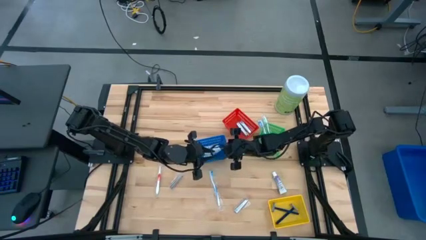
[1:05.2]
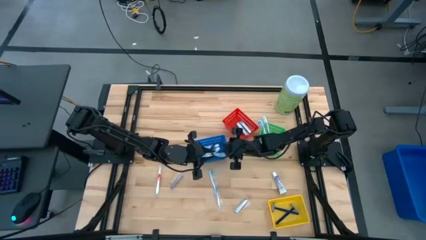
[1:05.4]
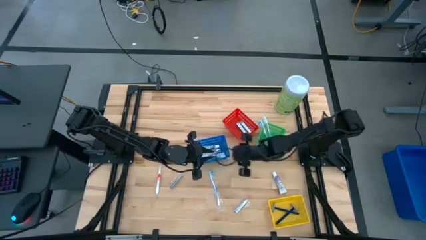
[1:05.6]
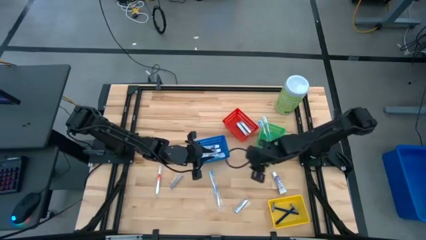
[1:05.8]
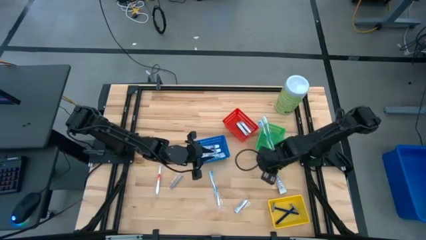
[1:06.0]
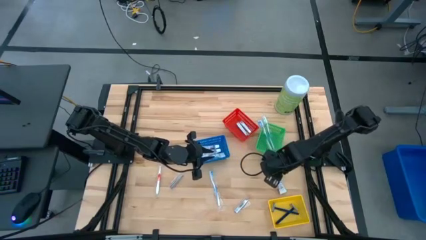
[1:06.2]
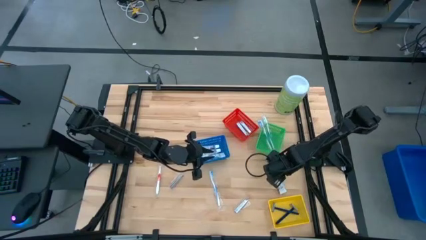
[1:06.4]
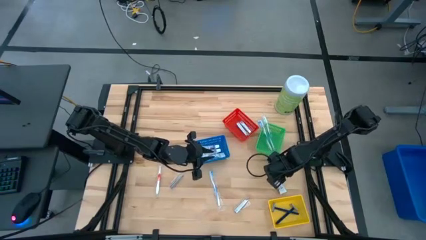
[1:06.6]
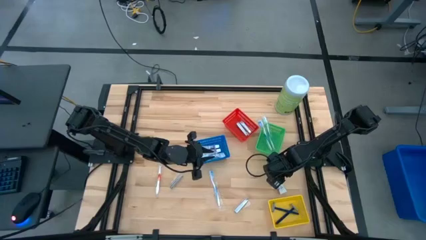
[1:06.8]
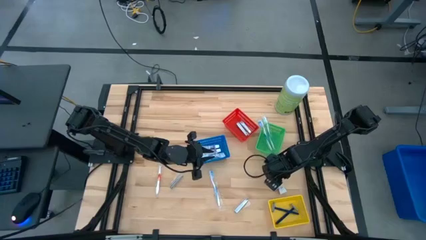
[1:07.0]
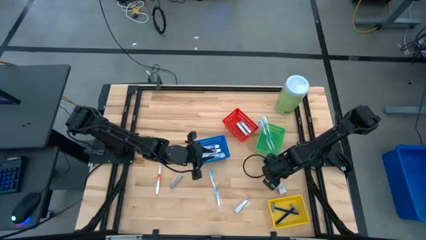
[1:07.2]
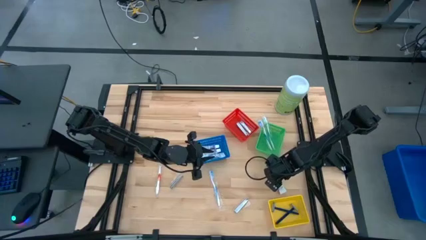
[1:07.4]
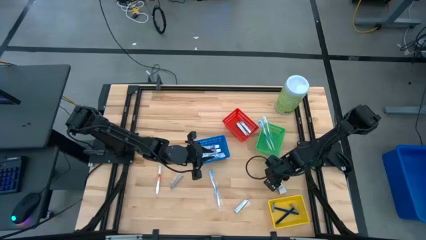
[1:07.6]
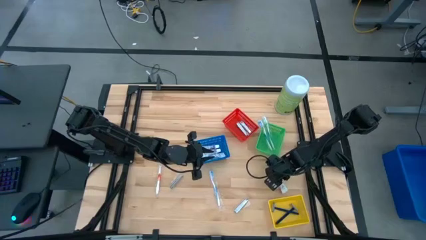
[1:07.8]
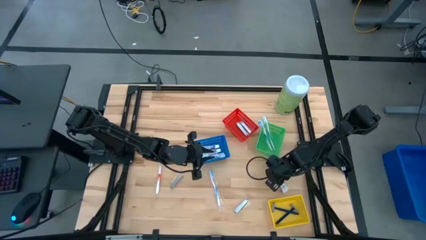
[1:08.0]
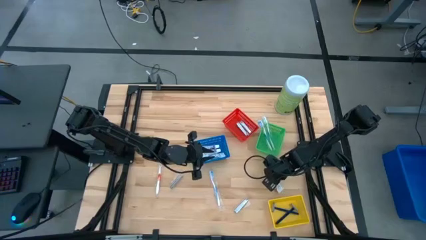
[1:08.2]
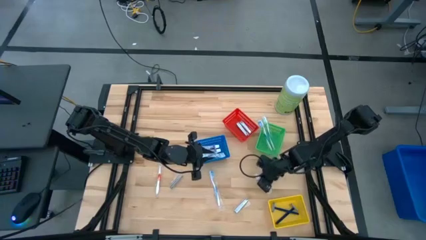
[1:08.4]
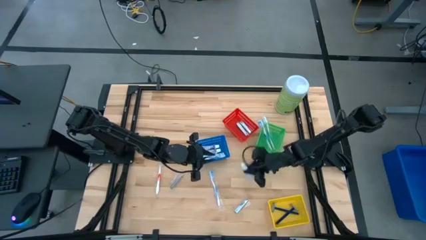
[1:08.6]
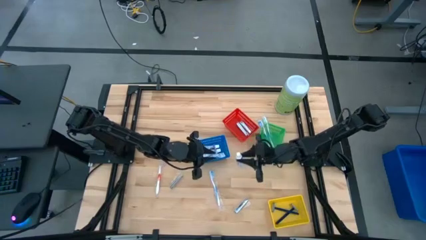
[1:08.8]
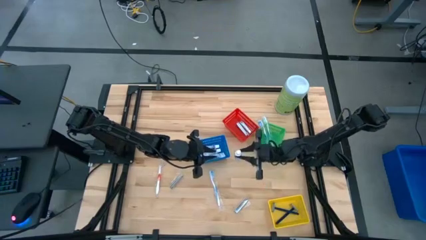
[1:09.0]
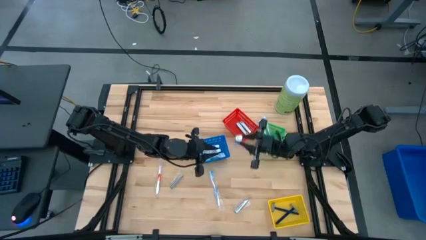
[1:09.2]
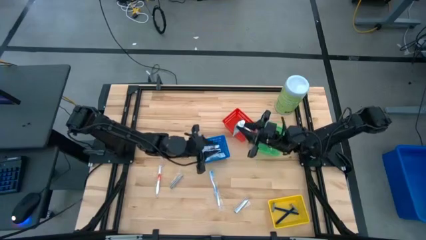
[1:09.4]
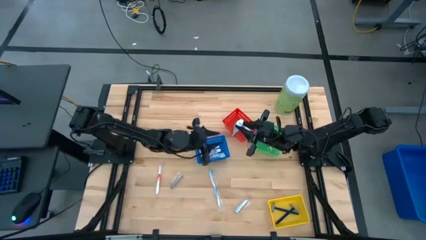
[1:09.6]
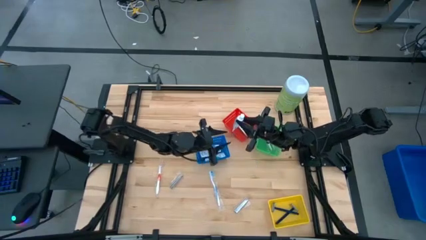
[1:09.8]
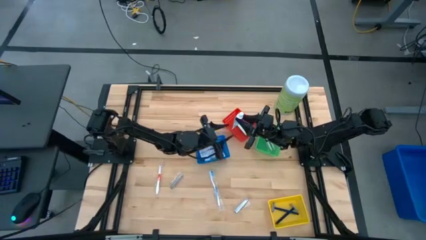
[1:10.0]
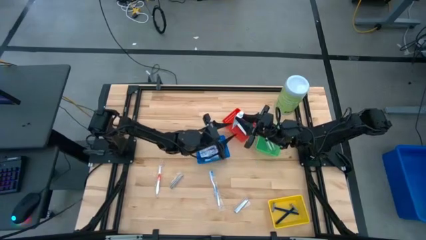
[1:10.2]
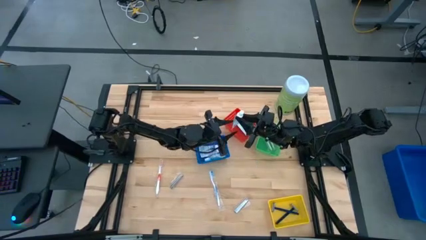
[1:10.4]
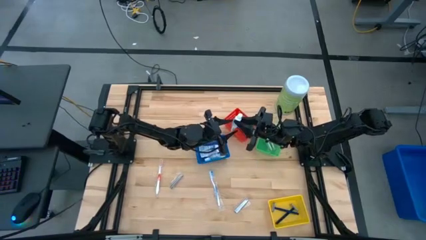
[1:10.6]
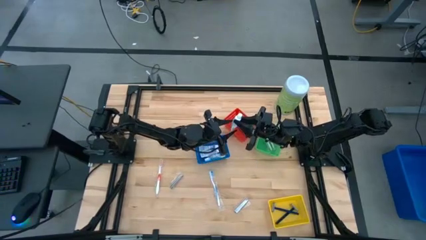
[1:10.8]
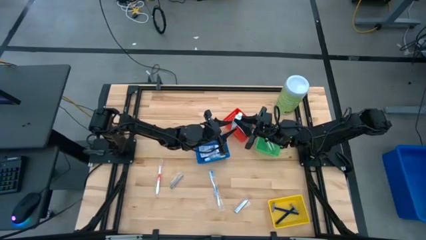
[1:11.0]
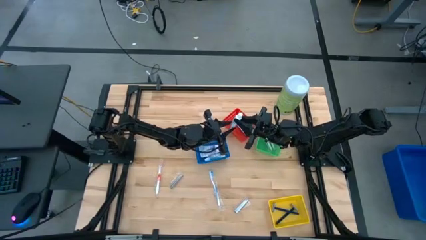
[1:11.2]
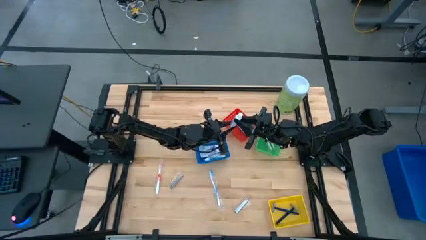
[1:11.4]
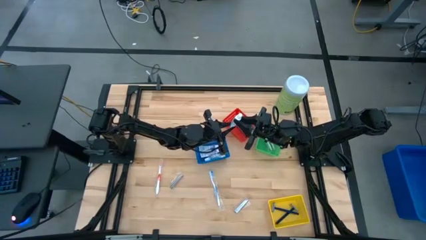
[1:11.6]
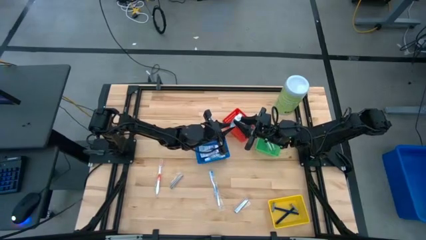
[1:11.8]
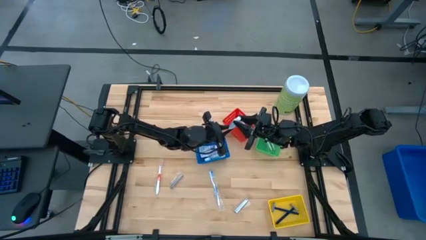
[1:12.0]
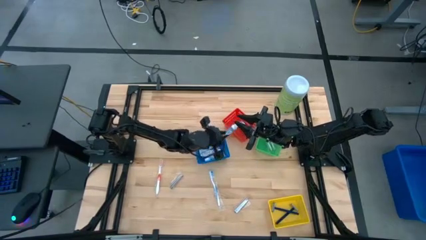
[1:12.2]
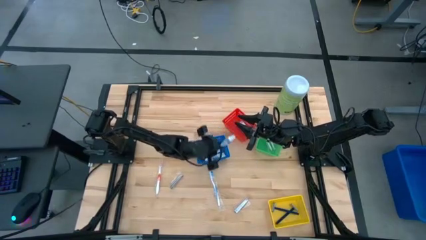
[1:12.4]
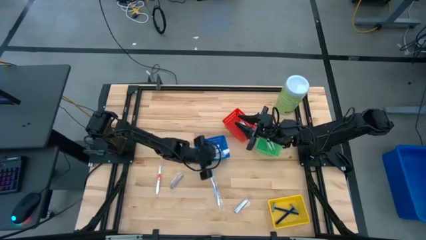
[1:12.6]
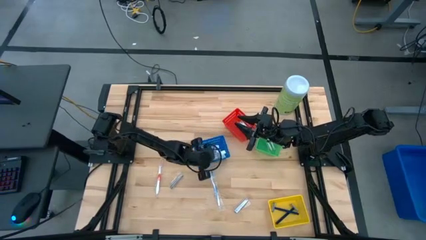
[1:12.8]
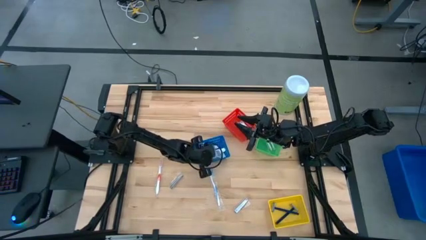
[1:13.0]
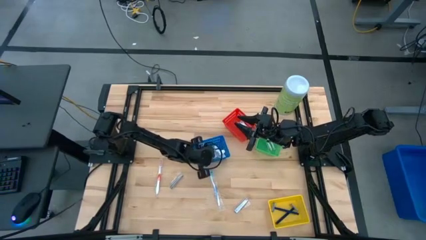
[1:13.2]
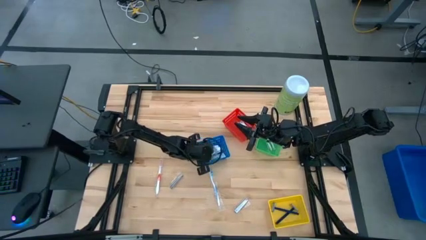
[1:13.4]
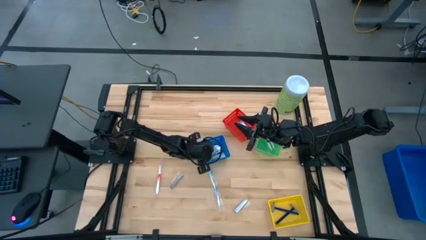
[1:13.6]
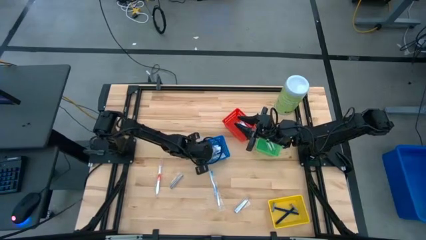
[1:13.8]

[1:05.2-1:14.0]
Task: Pick & Place Travel size toiletries
Put the white toothpaste into the blue bin

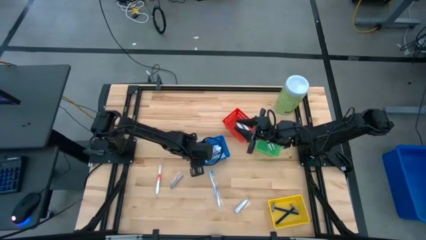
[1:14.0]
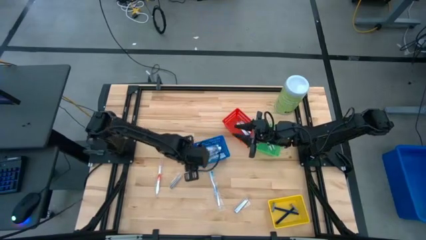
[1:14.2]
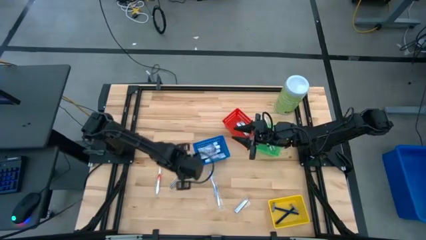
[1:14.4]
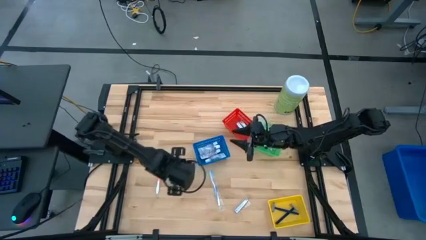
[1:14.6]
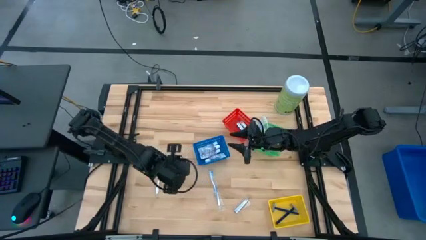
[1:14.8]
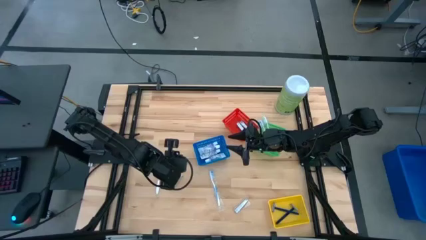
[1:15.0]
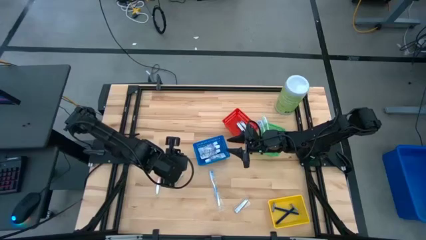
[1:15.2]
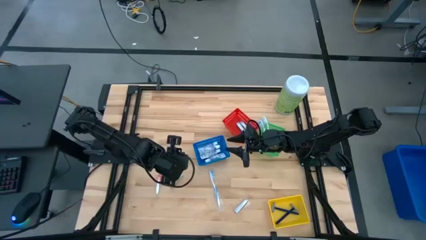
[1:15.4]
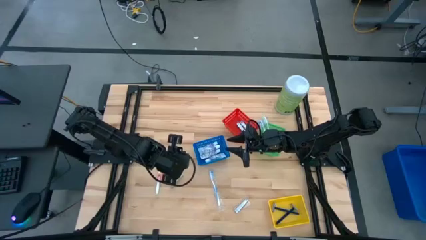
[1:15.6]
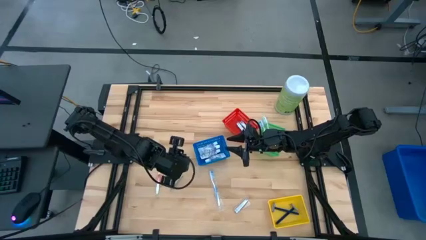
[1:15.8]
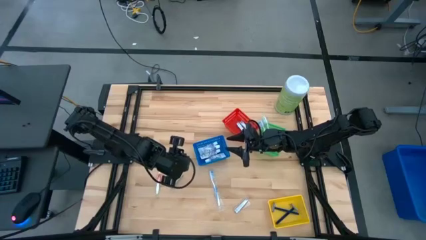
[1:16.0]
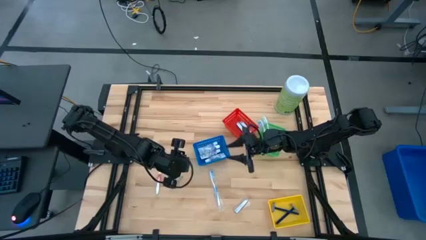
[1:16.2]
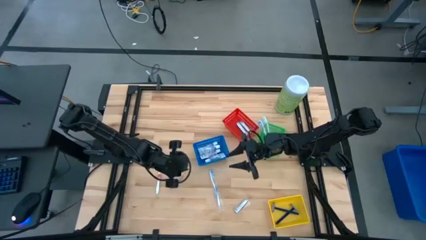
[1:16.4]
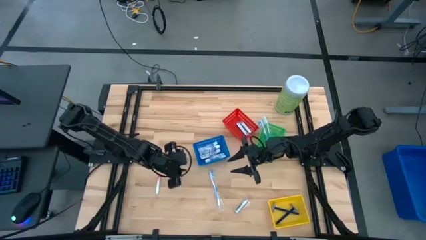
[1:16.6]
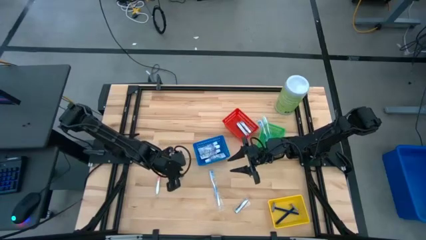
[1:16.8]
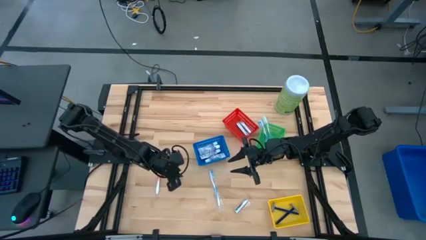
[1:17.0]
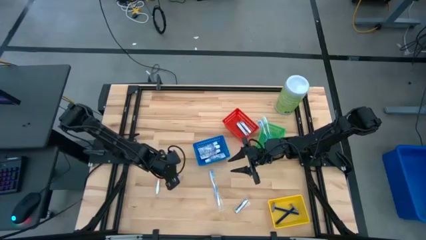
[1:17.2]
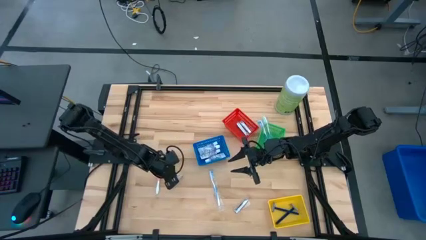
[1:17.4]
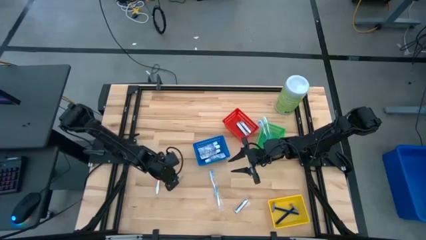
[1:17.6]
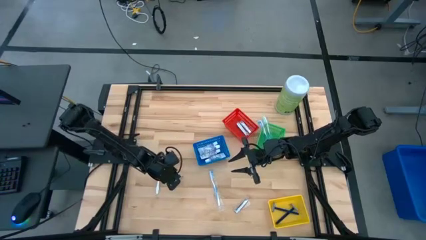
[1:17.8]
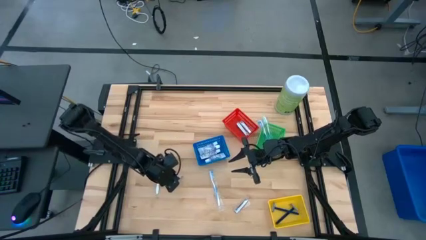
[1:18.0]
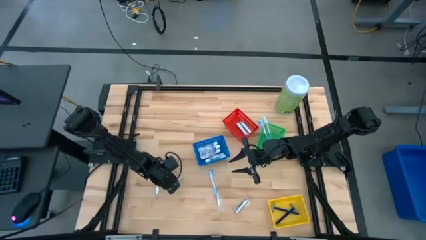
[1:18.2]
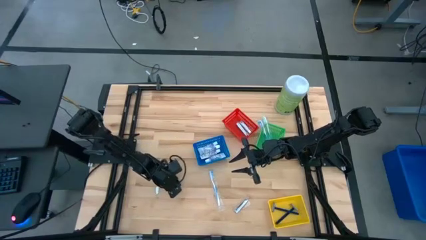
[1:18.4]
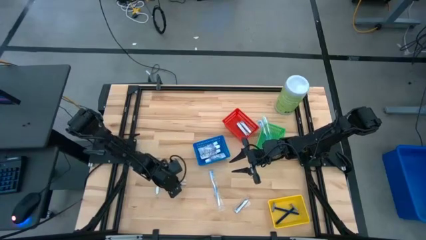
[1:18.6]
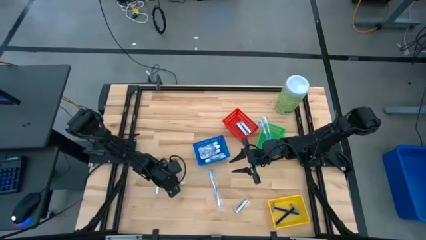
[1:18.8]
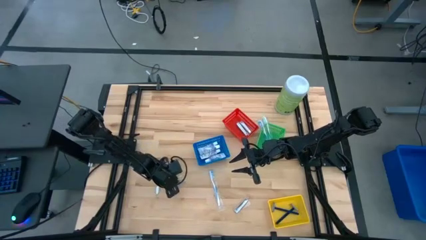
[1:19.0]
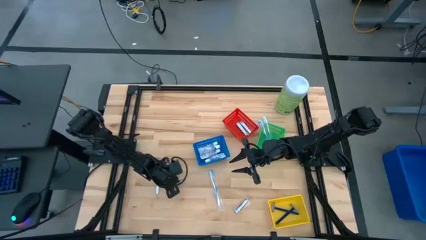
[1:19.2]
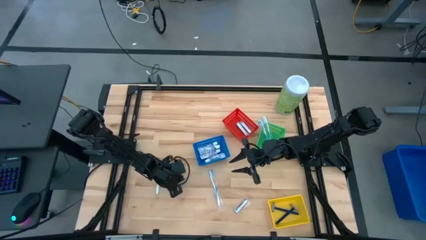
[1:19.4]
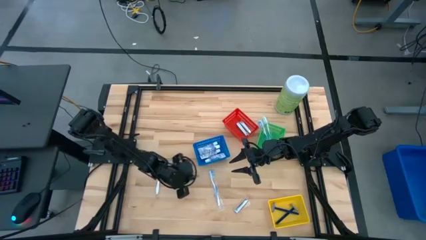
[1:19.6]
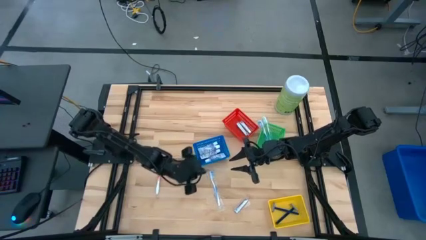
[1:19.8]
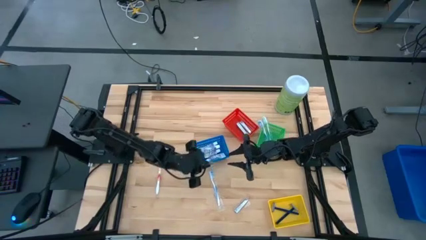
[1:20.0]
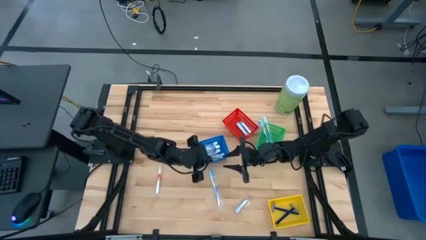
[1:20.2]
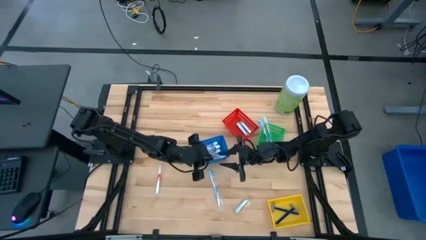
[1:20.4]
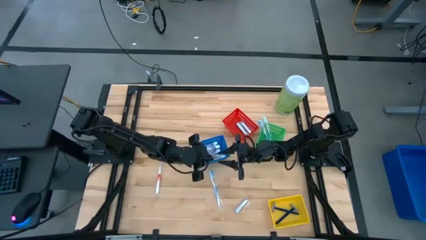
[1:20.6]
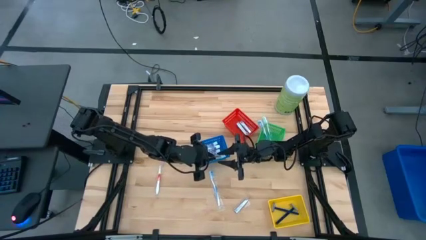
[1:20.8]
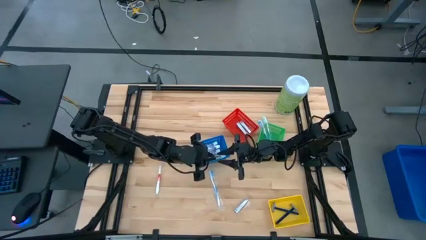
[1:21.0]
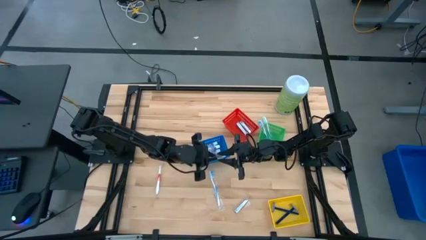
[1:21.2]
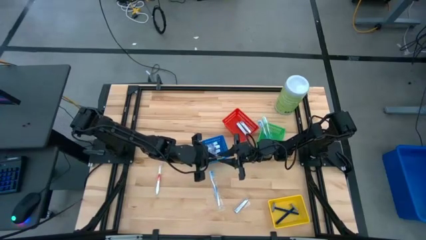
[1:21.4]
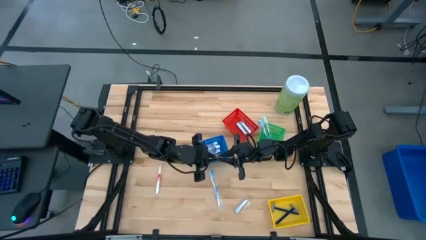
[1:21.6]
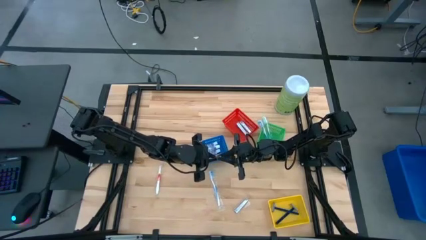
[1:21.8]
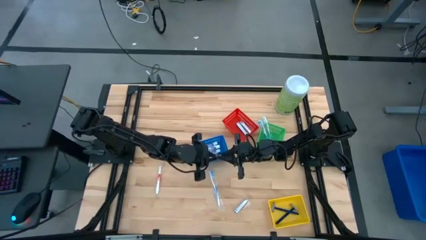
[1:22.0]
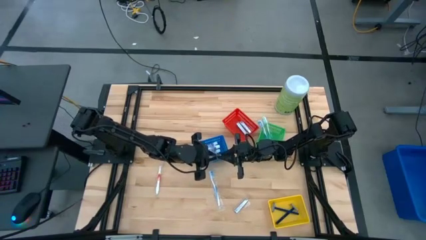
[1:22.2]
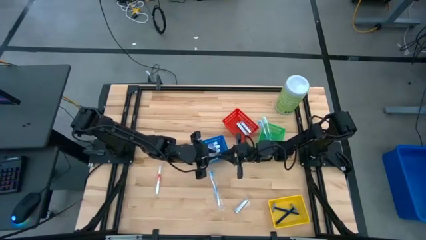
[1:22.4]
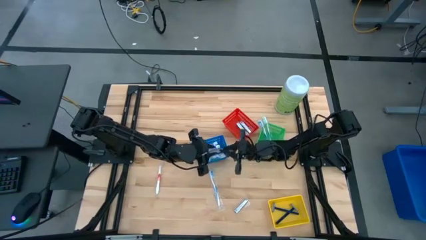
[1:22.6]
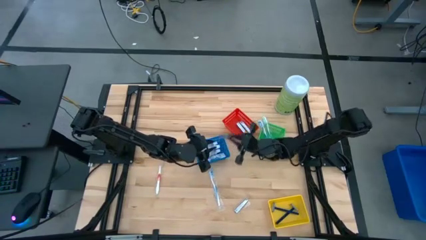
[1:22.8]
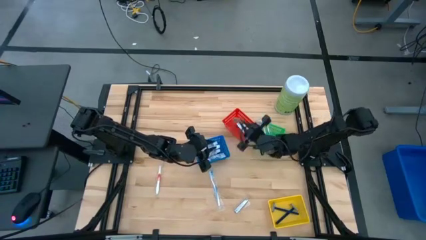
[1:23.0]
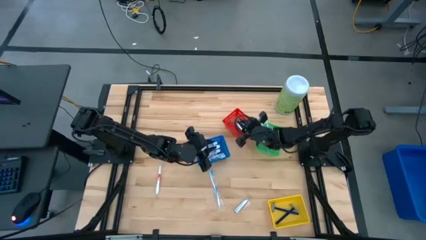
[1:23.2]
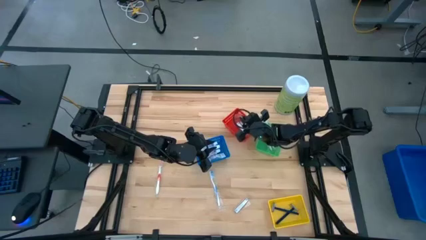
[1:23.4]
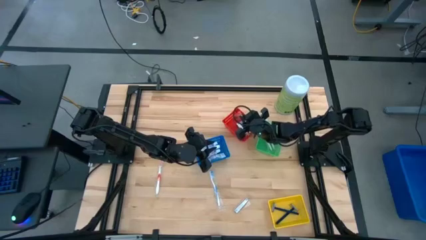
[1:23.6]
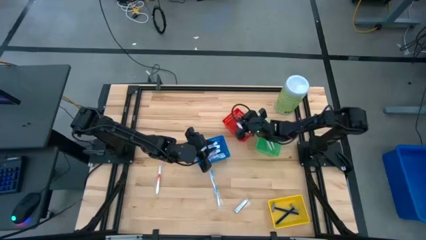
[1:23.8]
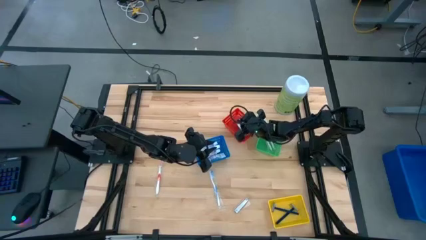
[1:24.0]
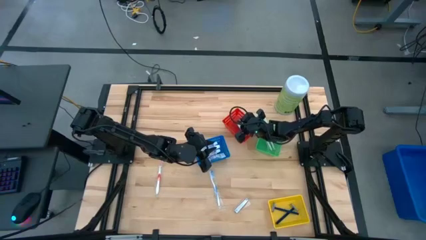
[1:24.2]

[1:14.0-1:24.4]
Put the silver nail cutter into the red bin
